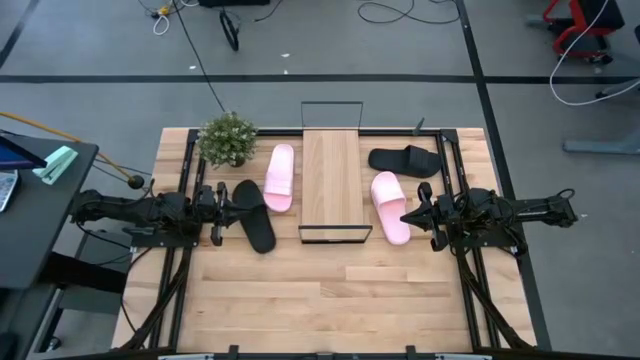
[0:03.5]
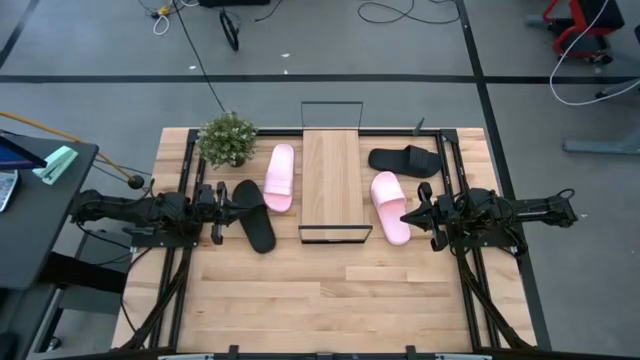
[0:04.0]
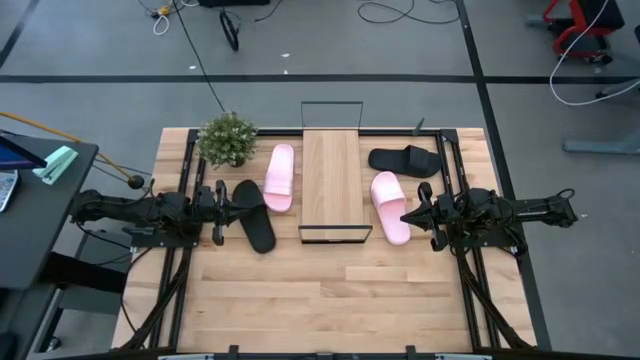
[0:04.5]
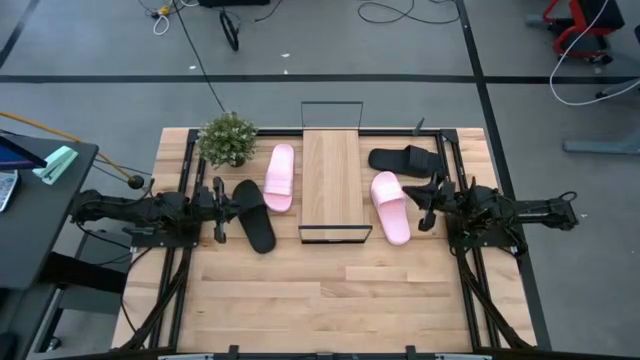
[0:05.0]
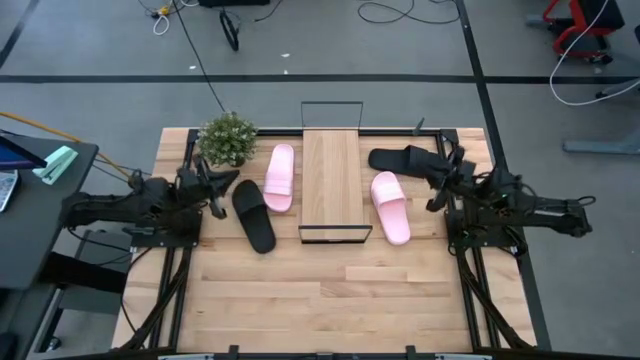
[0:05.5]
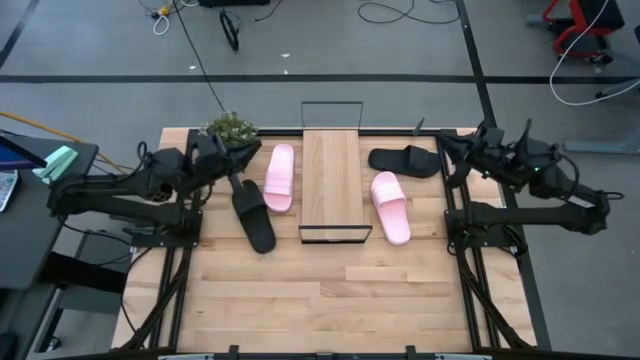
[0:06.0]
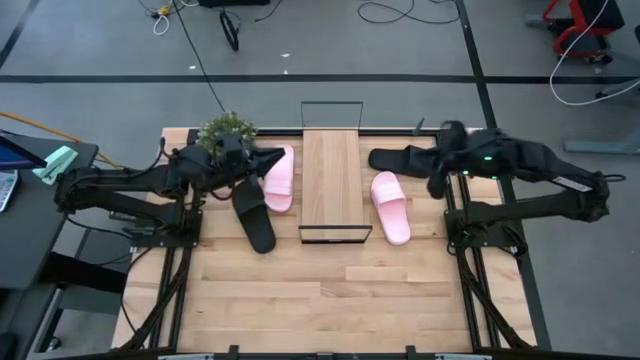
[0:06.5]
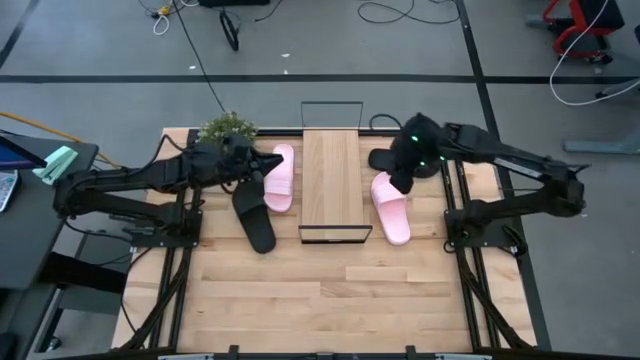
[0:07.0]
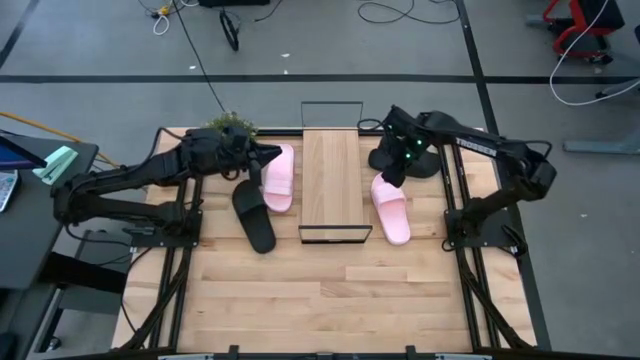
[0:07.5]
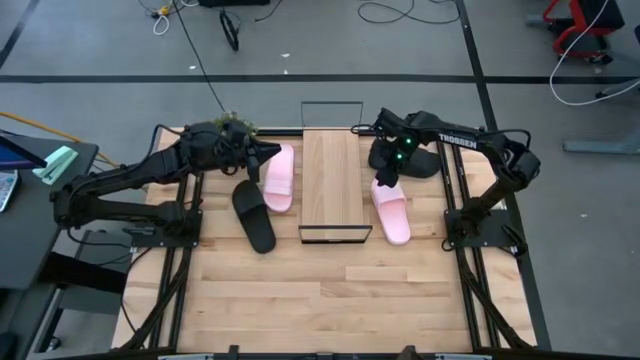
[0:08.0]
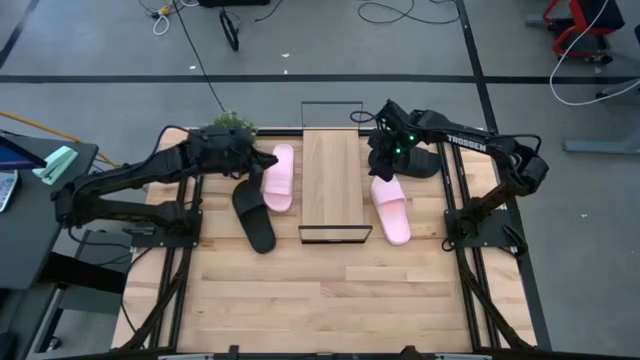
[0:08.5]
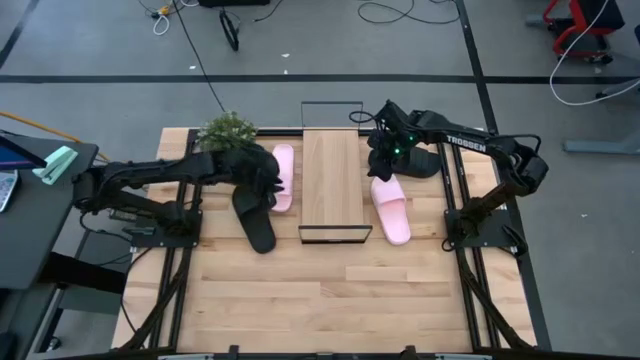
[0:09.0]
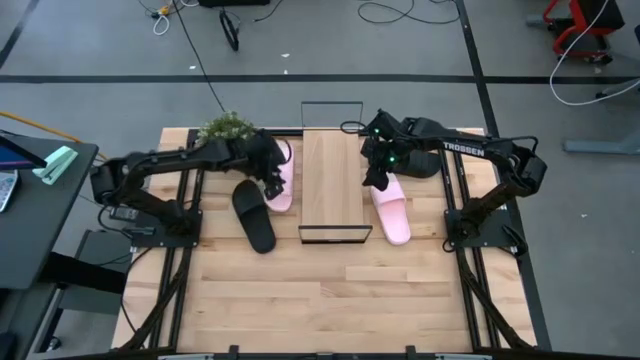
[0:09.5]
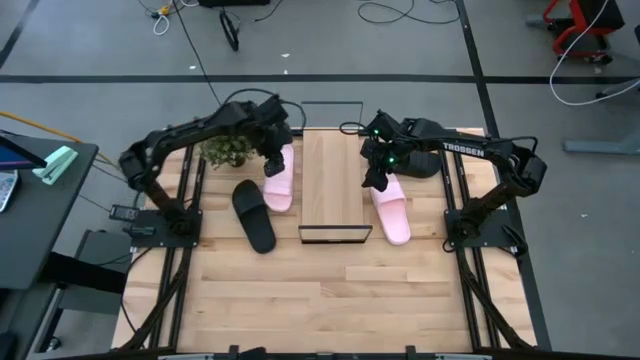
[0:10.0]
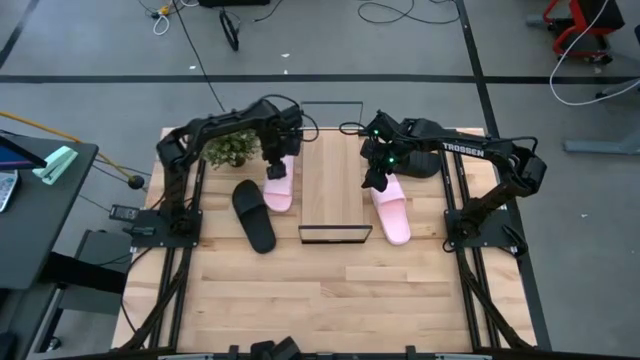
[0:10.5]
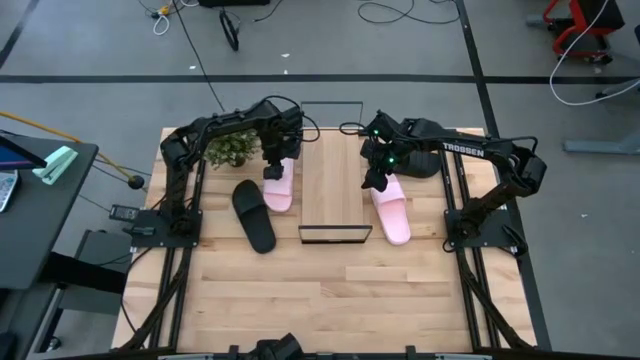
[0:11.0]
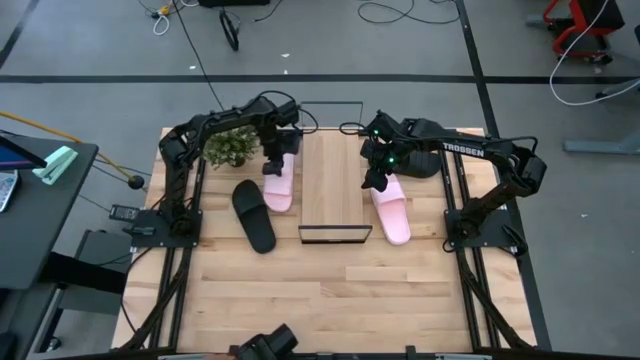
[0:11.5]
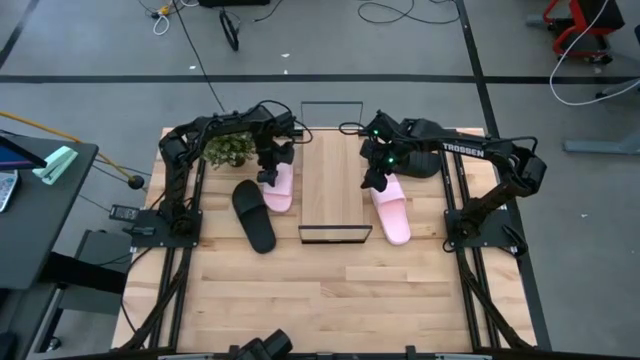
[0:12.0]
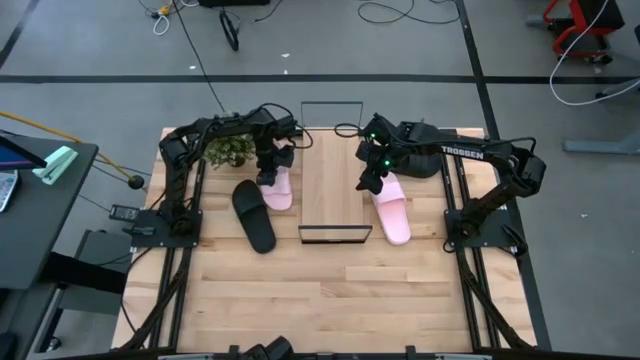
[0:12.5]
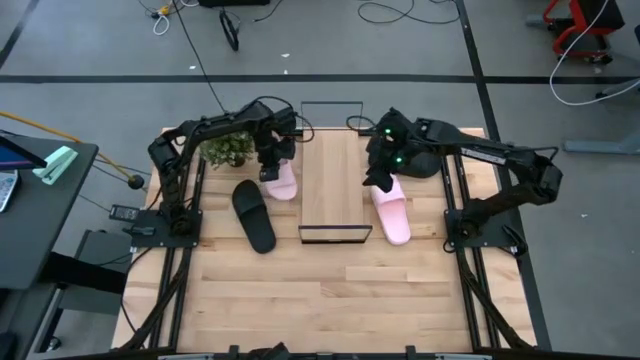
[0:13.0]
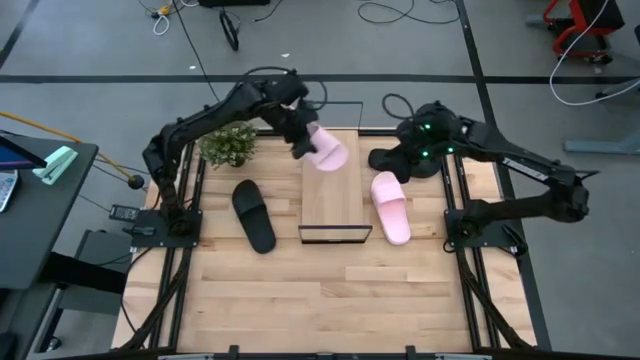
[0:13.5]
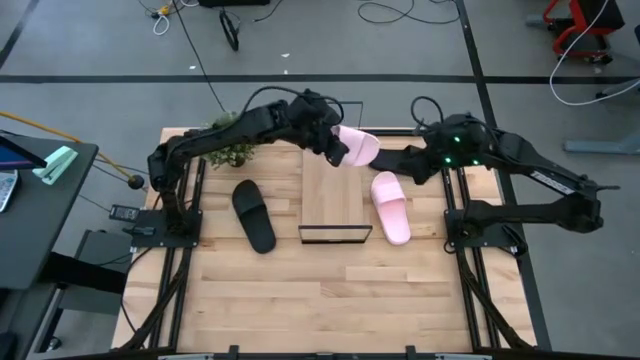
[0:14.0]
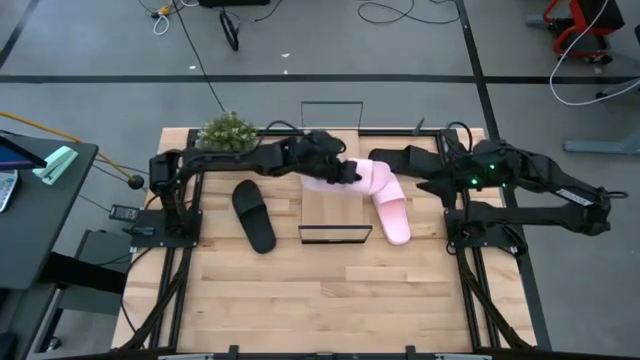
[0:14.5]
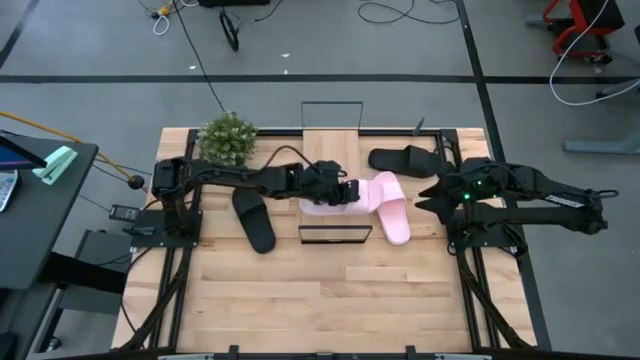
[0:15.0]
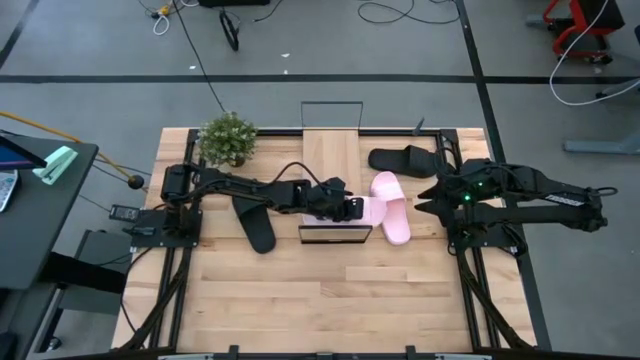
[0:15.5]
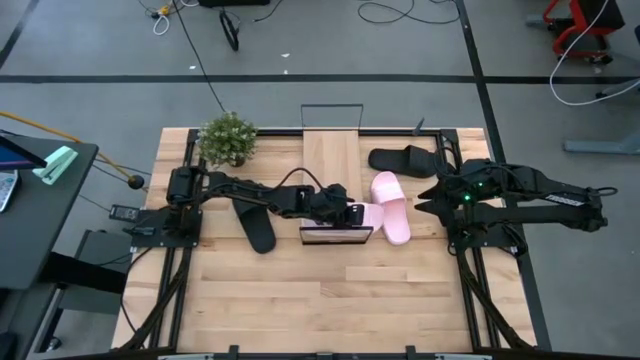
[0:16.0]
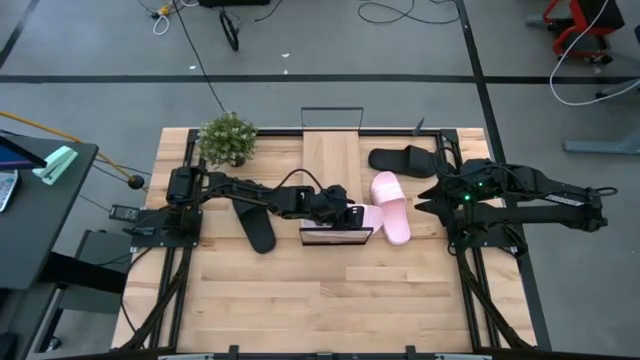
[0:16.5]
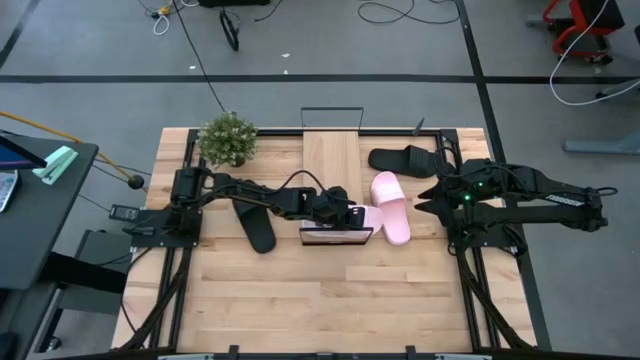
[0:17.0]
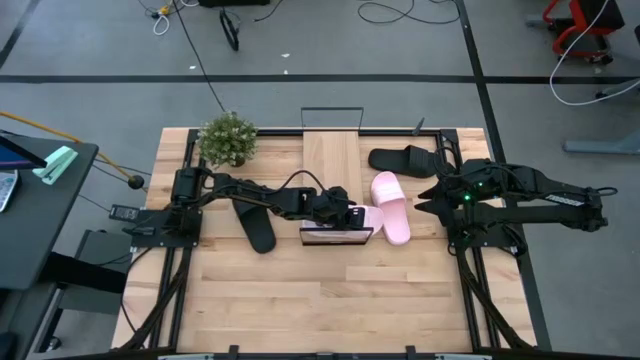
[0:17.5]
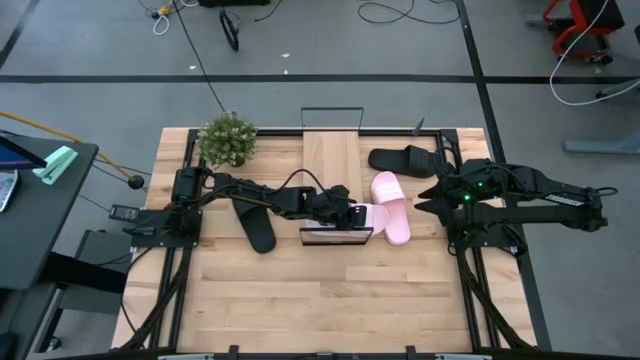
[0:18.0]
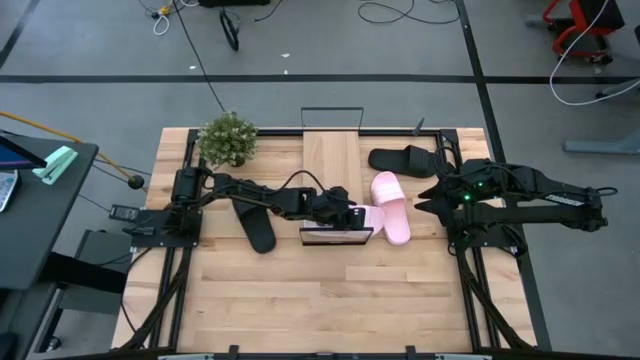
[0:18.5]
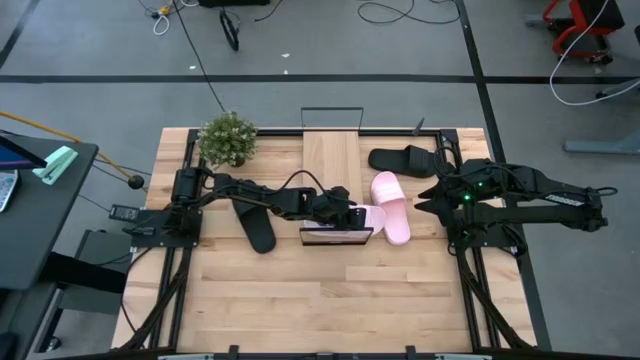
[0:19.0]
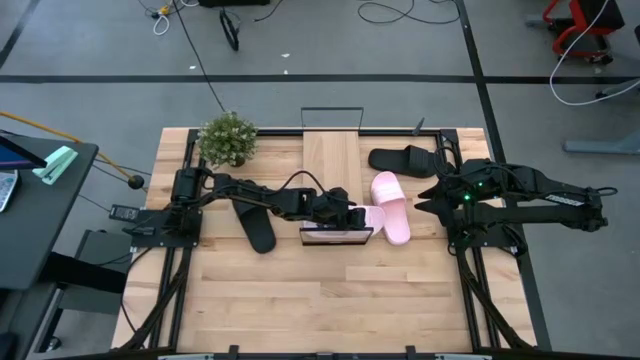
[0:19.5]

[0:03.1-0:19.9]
Task: Pick and place slides into the shelf
Put the left pink slides on the shelf

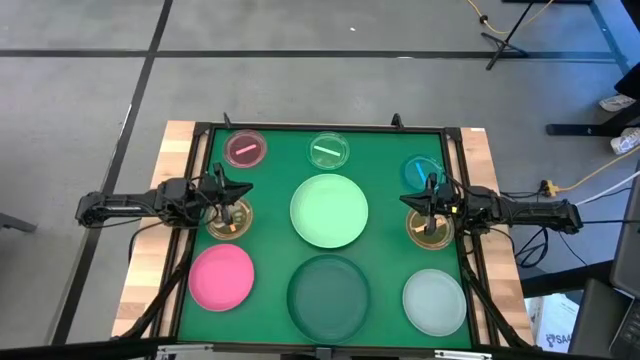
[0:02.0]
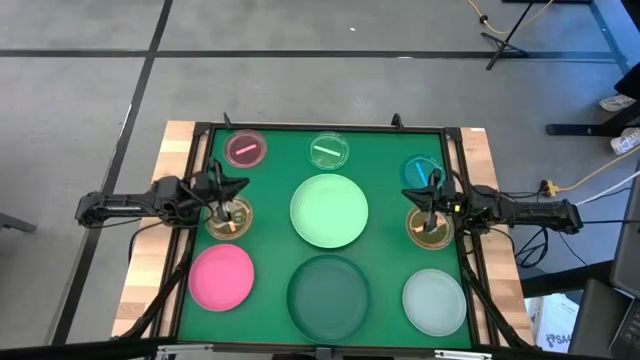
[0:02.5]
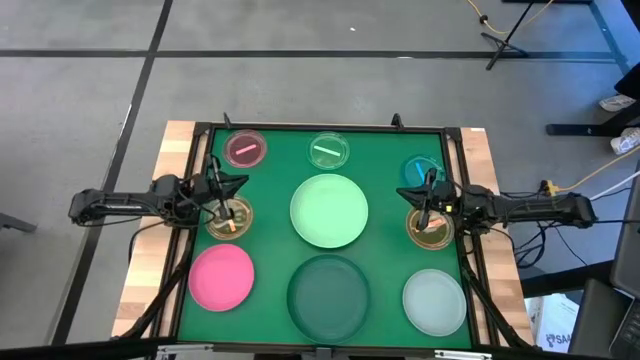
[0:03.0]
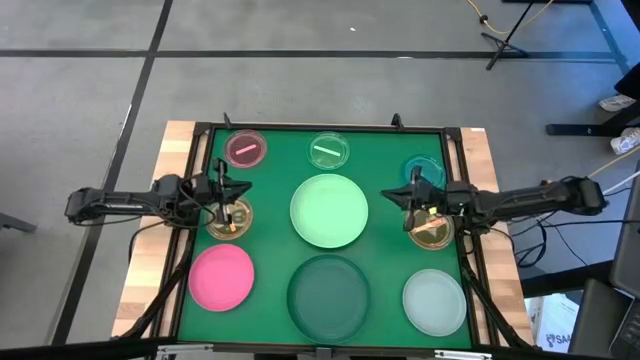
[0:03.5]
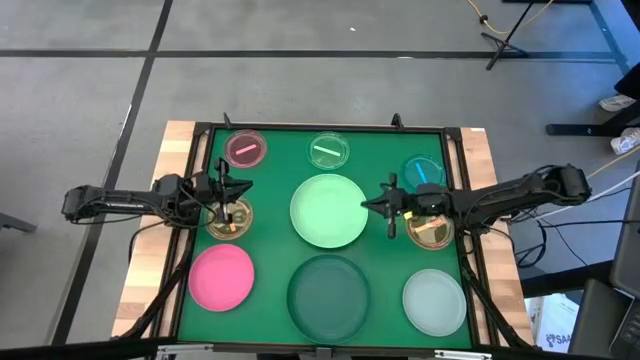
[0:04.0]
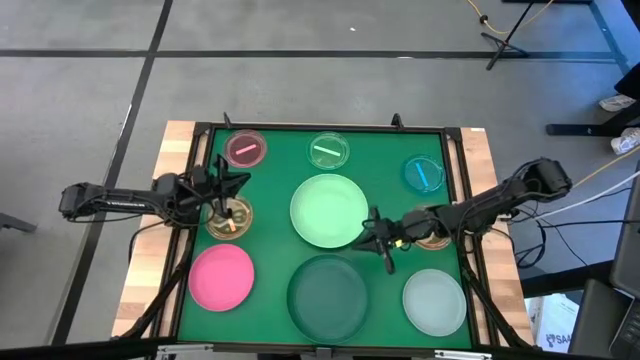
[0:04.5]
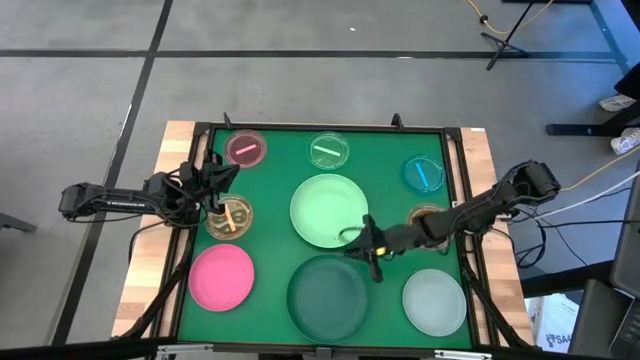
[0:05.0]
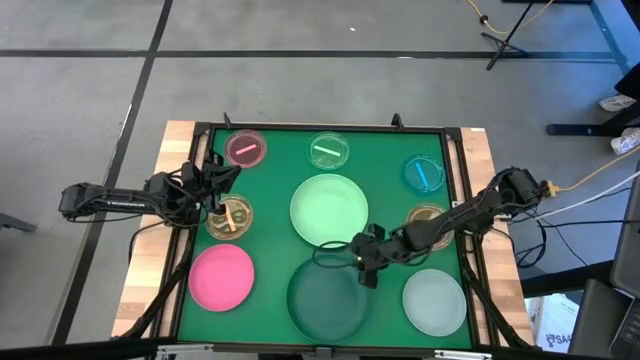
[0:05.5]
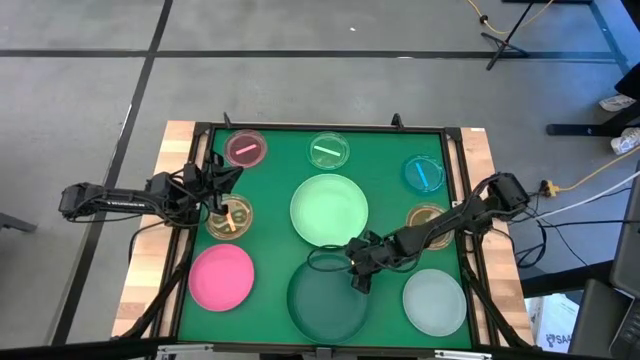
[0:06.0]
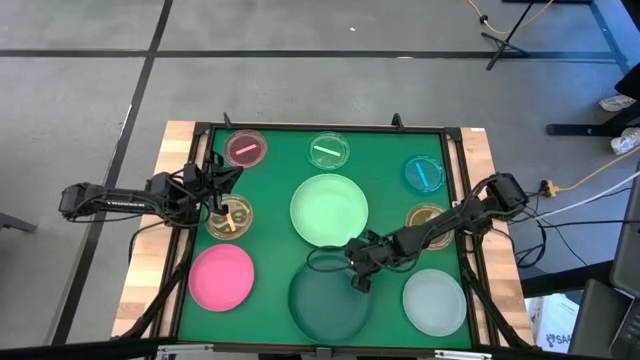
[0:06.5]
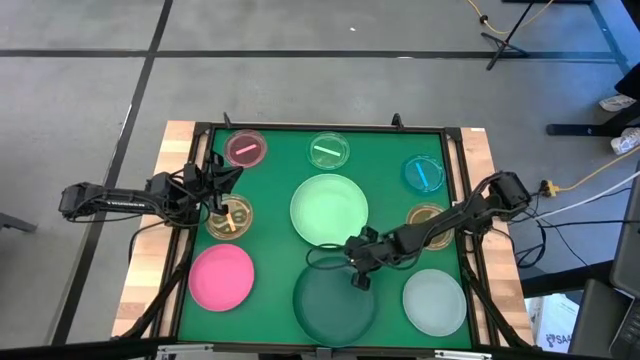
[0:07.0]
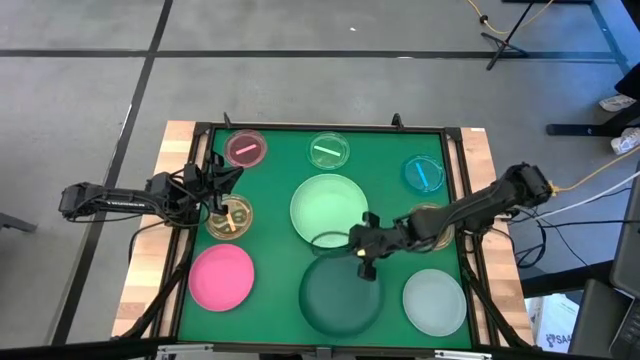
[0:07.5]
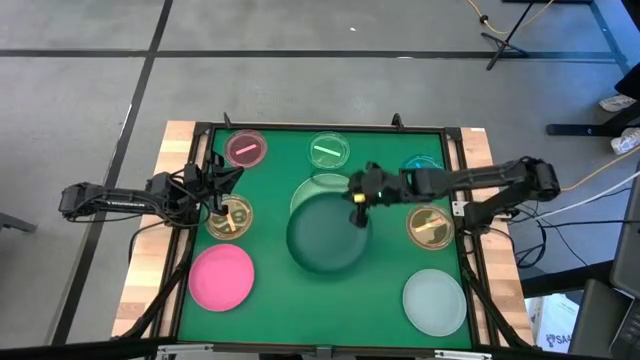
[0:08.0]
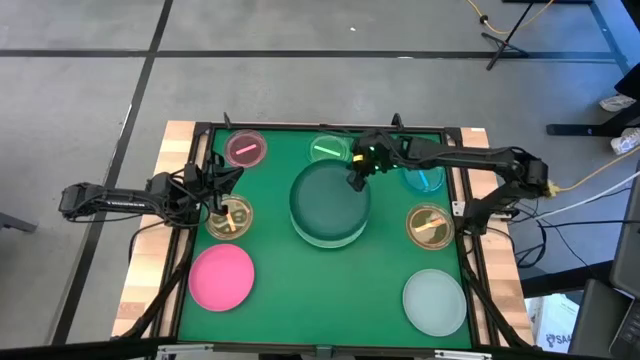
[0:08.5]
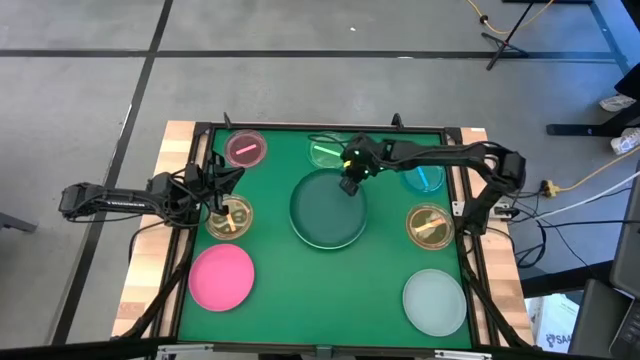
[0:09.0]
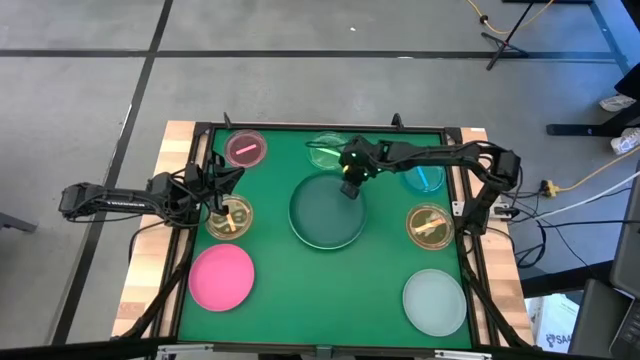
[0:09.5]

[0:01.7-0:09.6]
Task: Stack plastic plates
Stack the dark green plate on the light green plate
